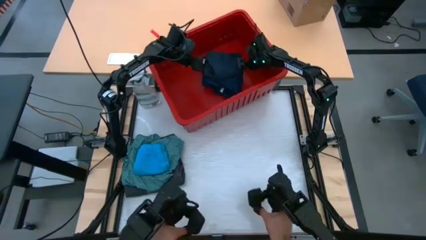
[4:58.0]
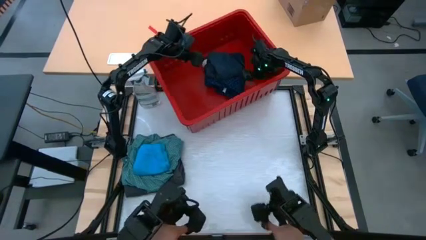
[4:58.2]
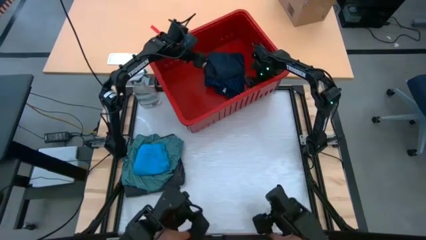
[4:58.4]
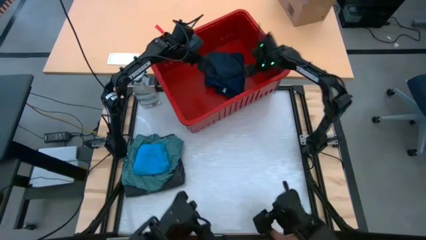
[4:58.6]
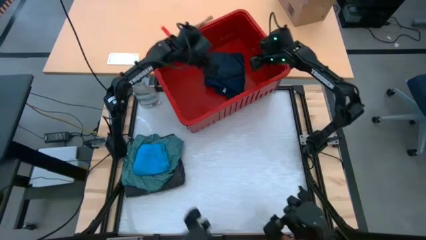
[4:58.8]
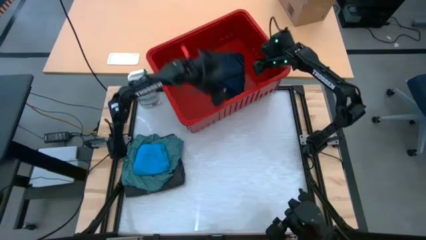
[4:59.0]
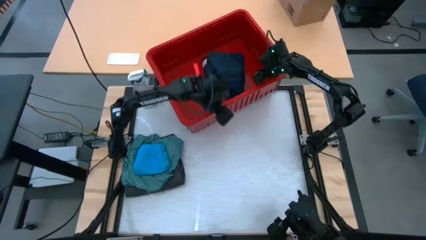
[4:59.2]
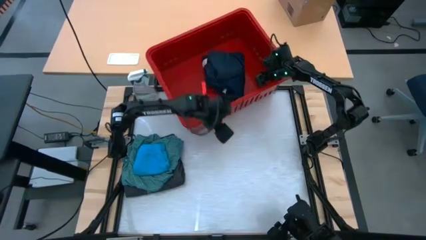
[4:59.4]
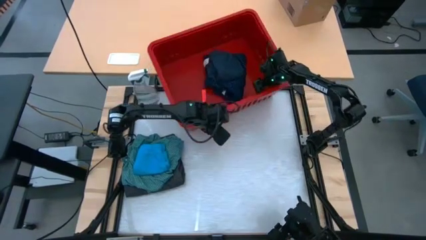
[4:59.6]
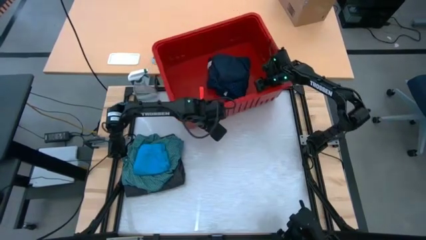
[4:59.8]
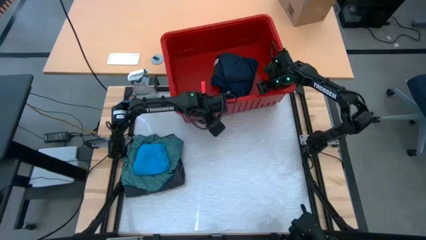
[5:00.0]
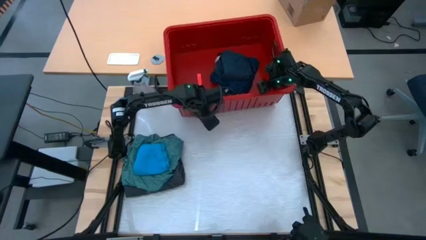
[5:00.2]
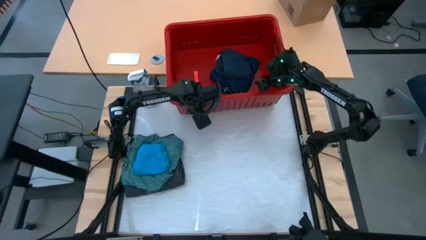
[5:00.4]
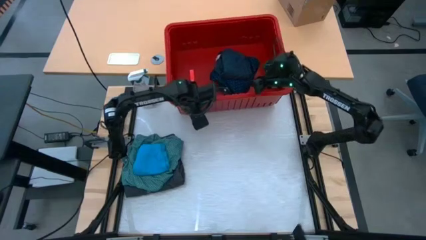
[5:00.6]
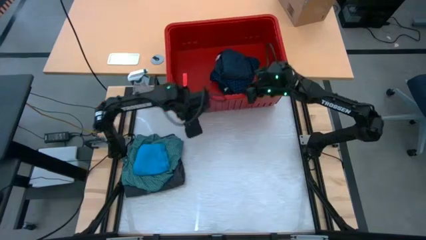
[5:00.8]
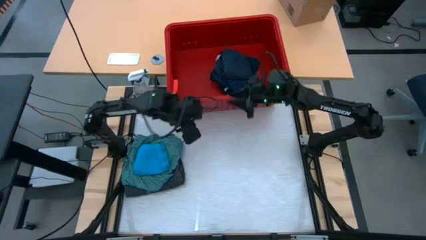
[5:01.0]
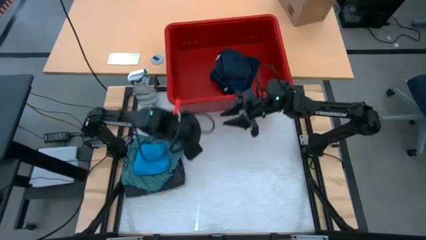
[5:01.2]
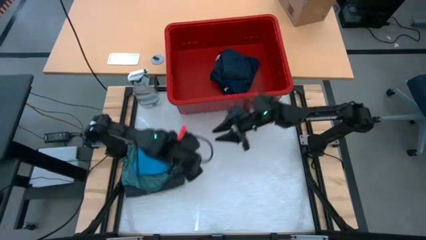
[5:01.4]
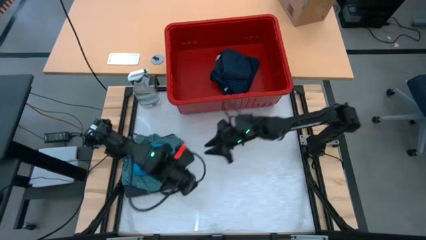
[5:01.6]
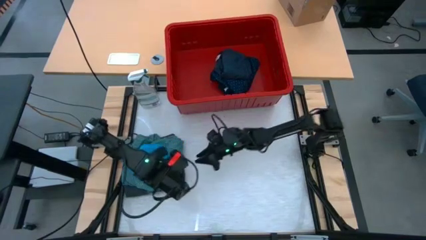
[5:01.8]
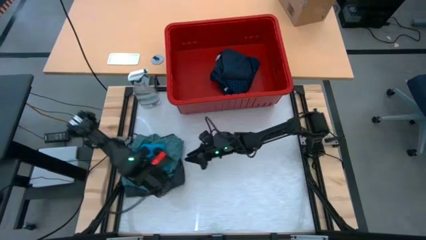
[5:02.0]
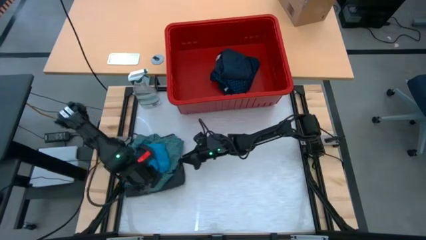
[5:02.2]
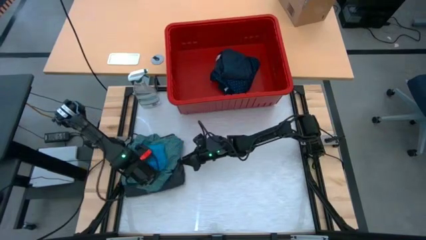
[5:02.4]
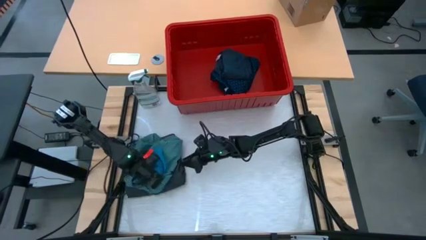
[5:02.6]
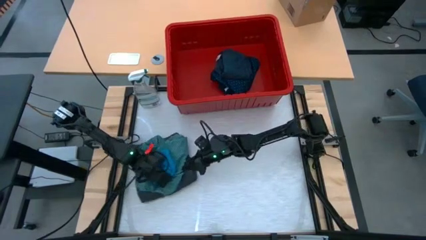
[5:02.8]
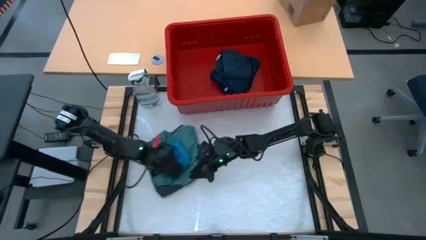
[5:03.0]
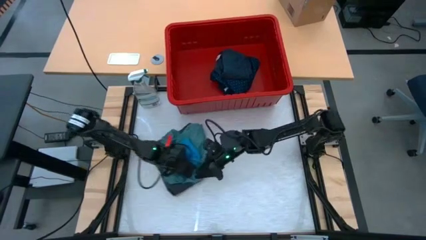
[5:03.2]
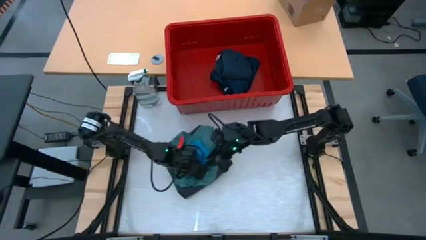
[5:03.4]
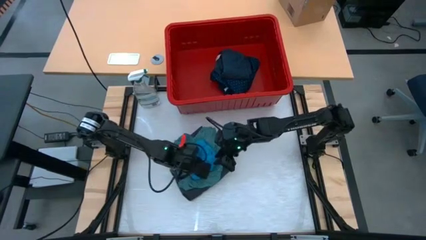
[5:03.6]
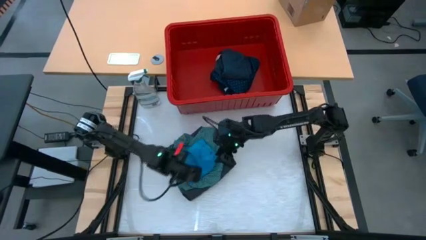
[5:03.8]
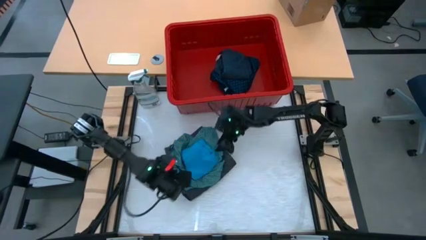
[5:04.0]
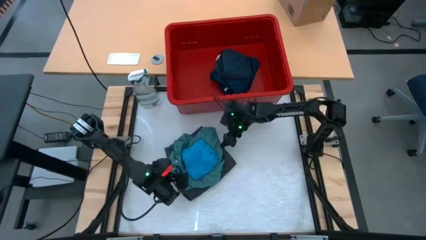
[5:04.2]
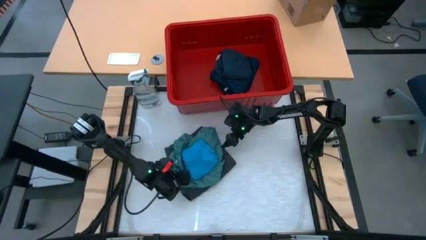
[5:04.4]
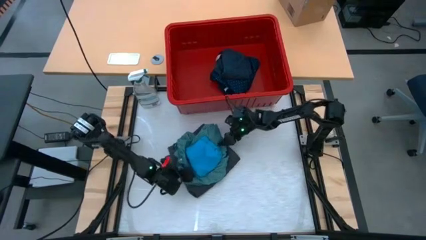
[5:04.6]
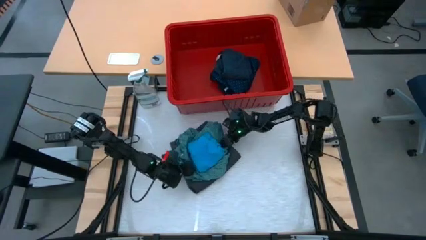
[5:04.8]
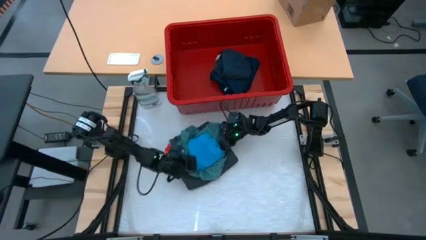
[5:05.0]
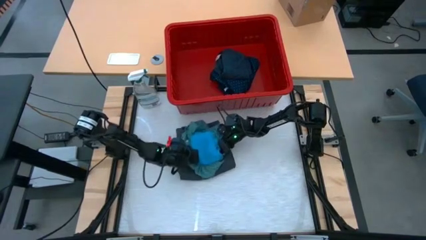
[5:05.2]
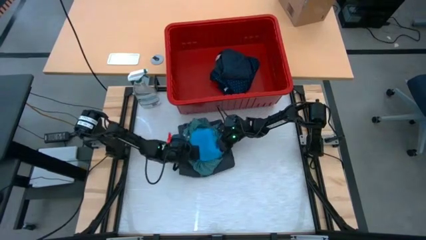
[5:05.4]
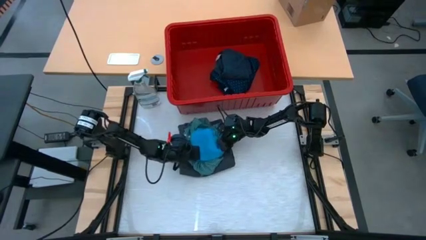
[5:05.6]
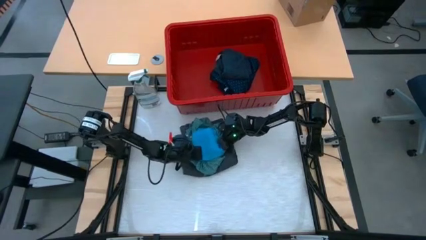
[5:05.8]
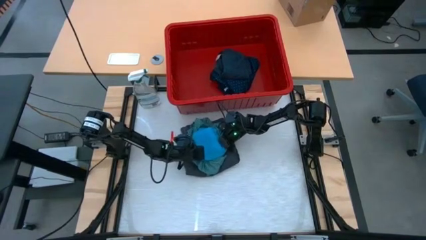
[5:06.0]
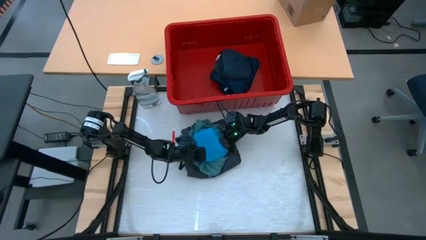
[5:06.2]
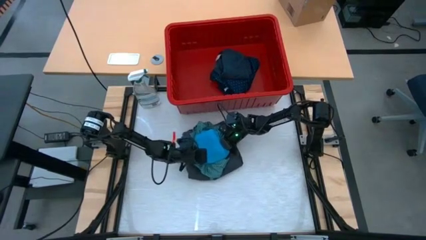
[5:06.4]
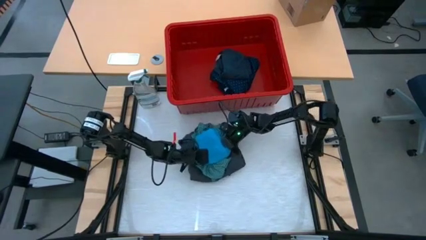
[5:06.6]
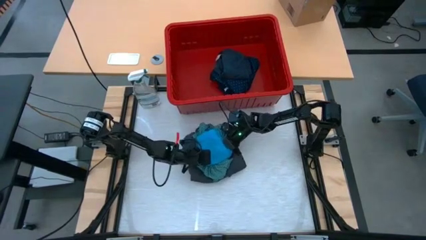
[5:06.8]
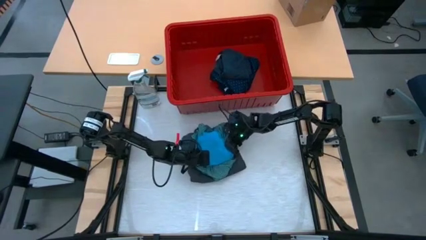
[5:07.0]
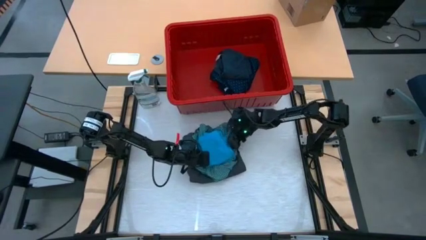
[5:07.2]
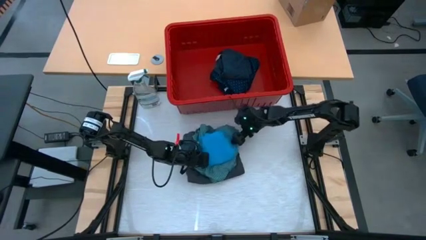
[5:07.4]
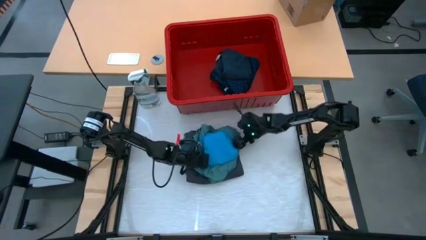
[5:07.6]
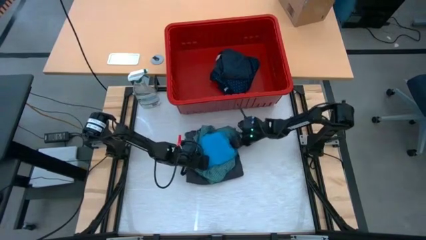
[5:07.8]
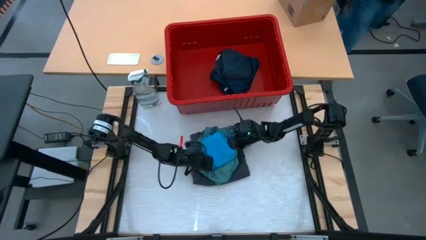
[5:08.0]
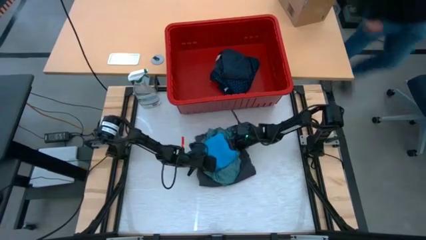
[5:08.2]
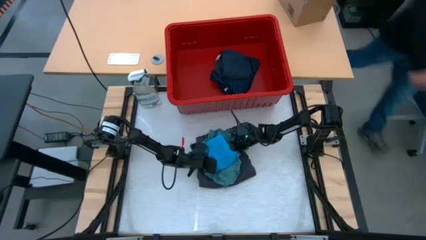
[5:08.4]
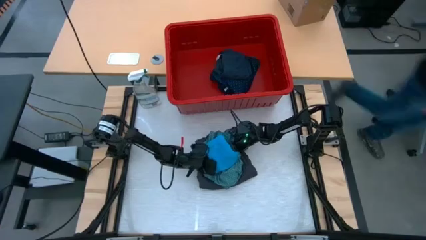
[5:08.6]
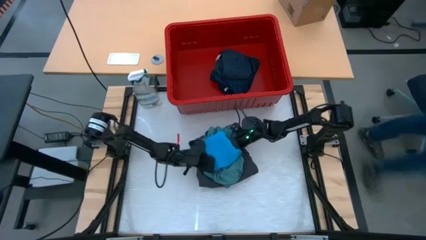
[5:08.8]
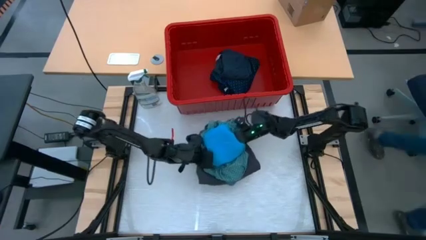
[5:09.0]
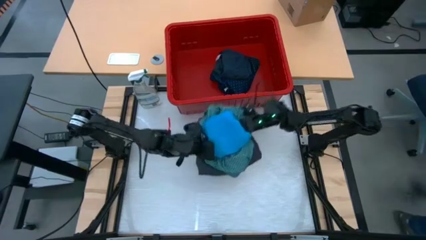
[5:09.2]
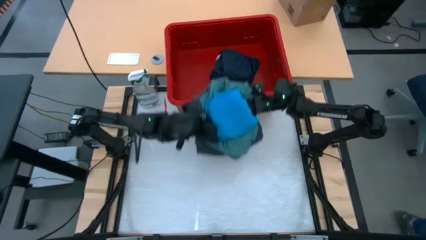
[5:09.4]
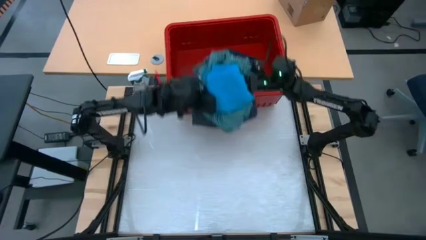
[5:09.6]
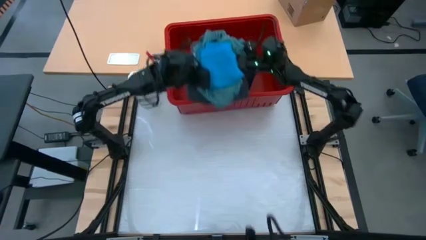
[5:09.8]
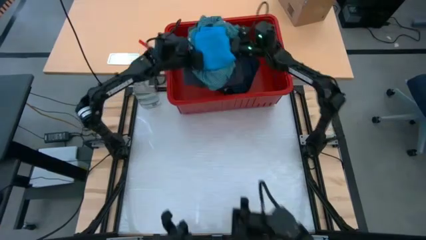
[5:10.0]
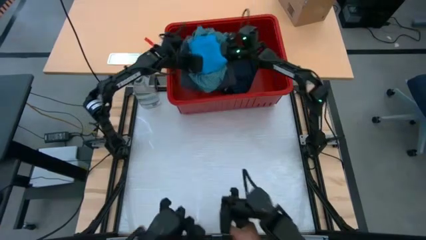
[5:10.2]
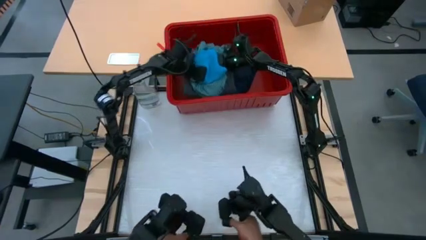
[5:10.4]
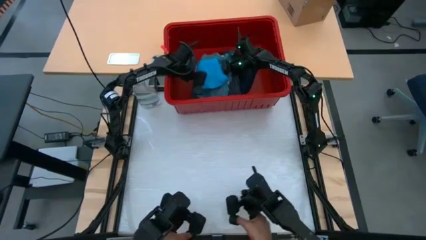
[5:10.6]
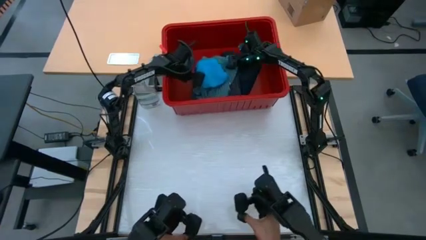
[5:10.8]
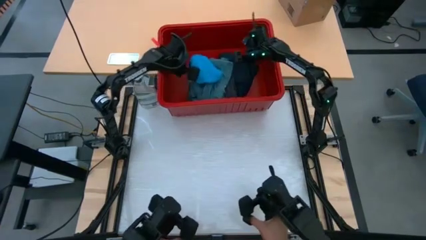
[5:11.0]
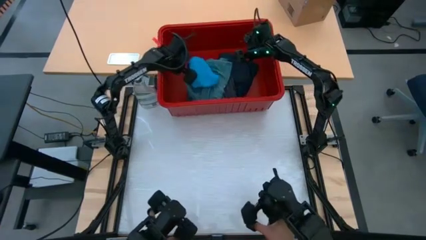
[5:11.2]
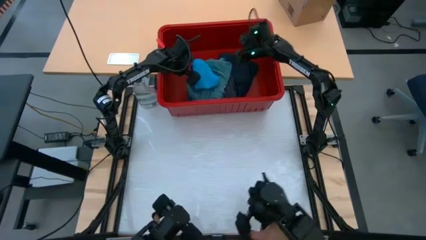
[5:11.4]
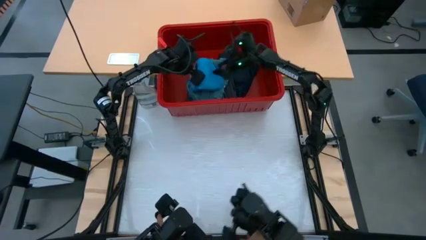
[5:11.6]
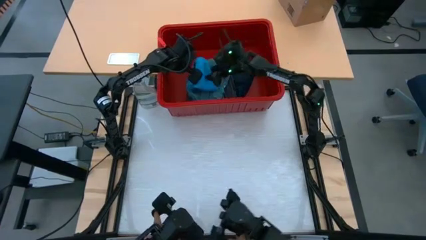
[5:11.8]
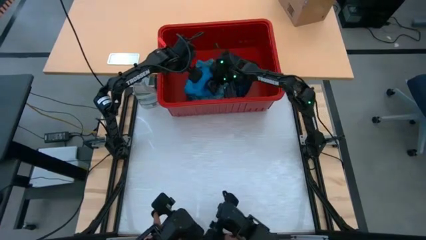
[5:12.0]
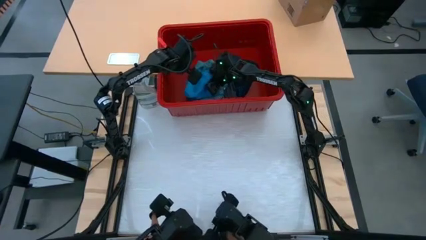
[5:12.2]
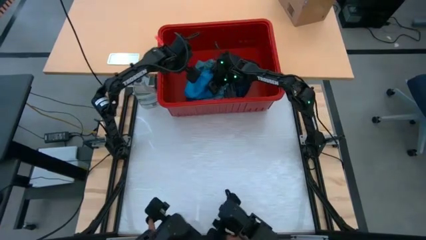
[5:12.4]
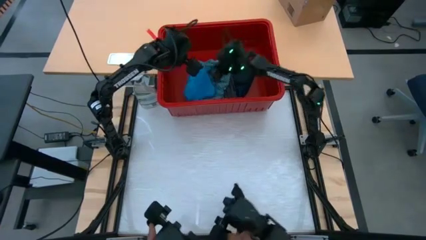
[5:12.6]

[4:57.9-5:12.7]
Task: Fold laundry
Put the stack of clothes into the red bin

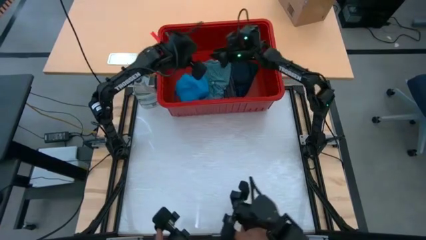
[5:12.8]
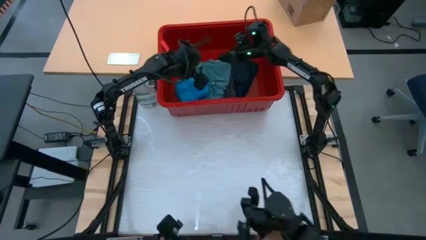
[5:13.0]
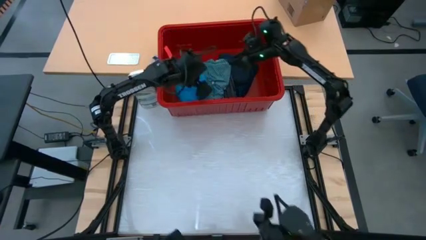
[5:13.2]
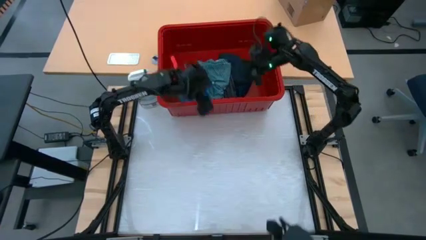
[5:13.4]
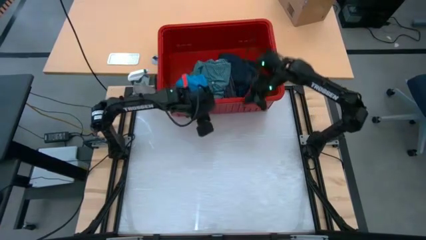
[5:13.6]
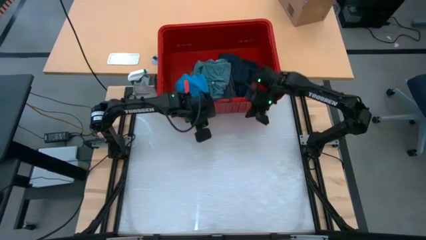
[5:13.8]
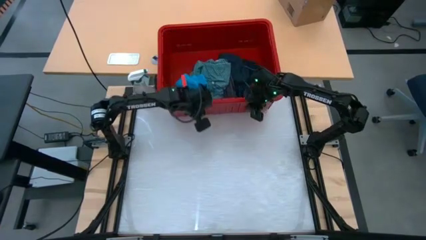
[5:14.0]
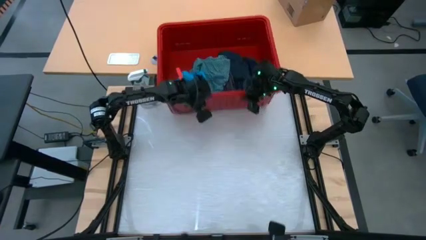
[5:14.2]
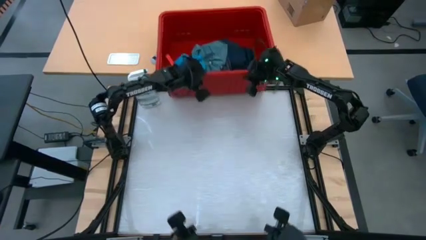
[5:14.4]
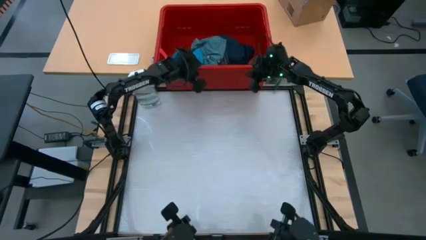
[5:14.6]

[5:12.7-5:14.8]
Adjust the laundry bin
